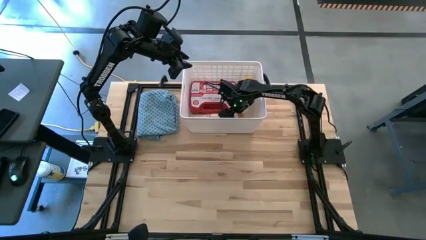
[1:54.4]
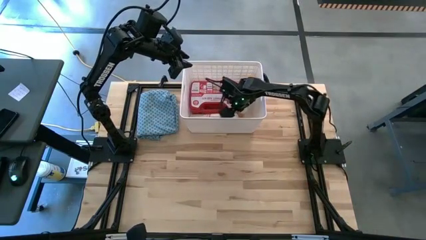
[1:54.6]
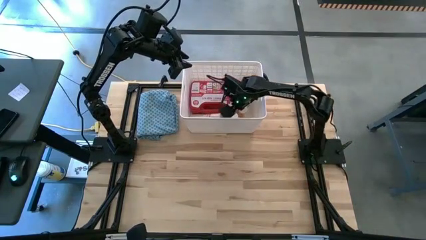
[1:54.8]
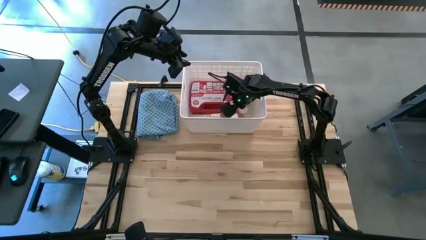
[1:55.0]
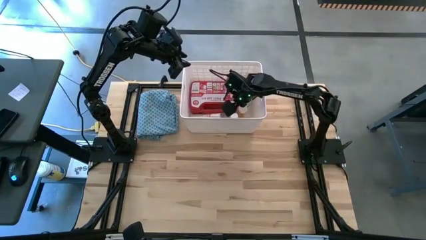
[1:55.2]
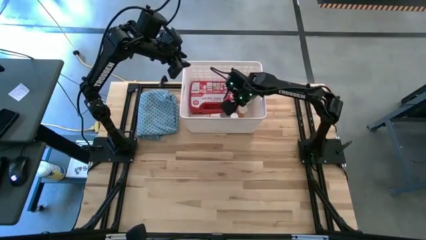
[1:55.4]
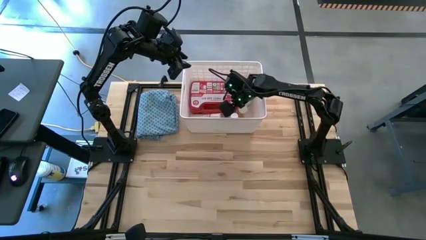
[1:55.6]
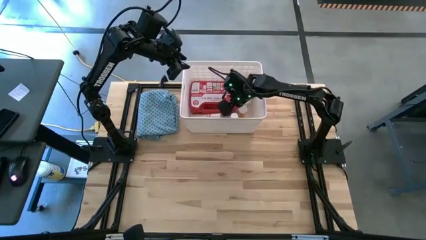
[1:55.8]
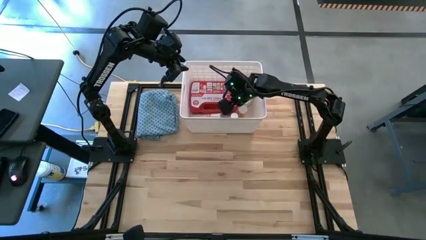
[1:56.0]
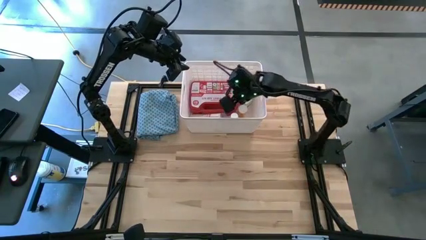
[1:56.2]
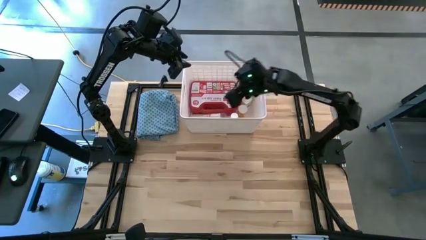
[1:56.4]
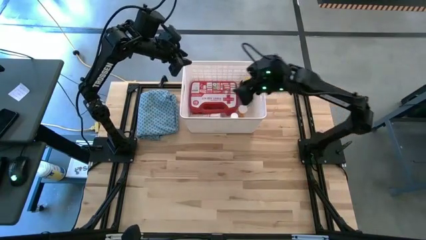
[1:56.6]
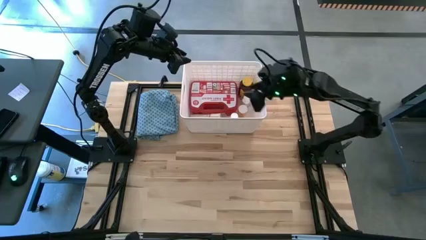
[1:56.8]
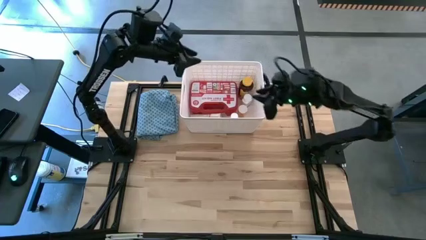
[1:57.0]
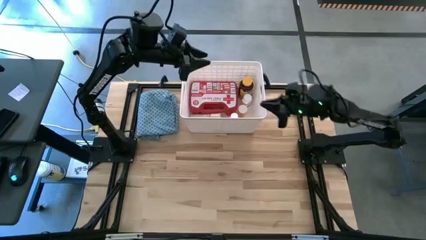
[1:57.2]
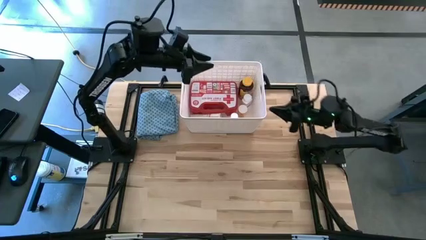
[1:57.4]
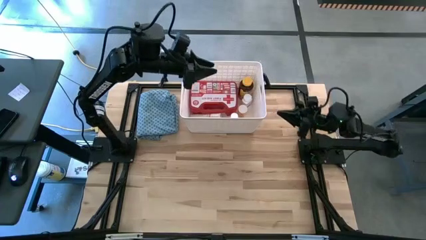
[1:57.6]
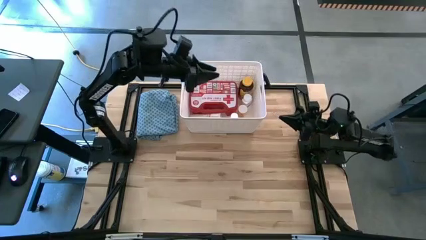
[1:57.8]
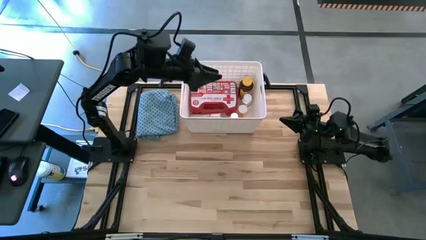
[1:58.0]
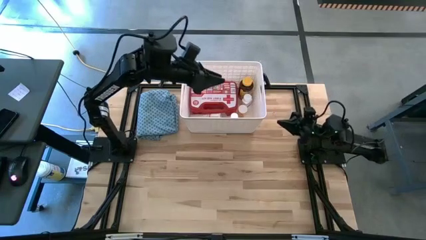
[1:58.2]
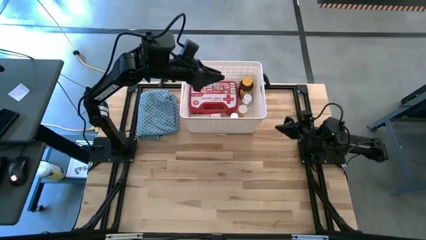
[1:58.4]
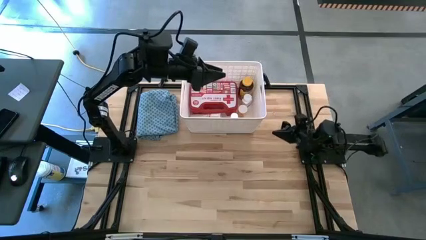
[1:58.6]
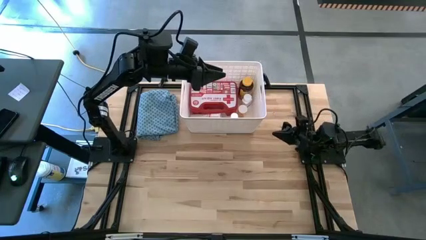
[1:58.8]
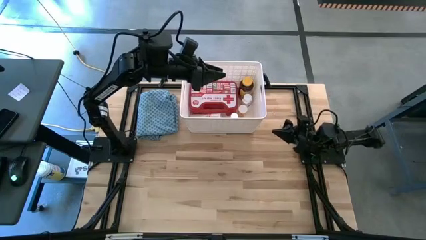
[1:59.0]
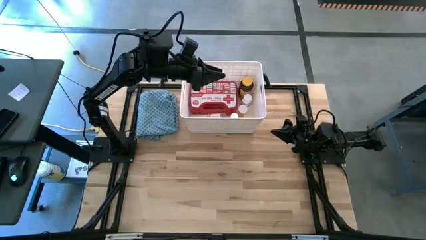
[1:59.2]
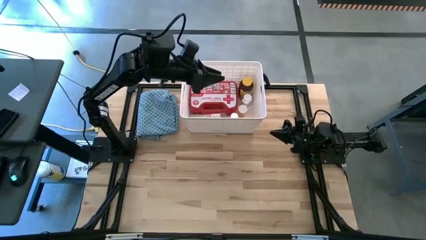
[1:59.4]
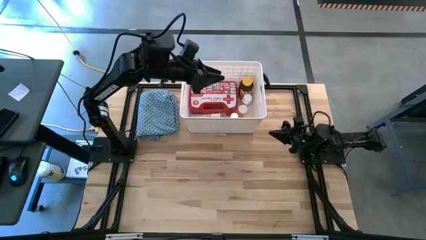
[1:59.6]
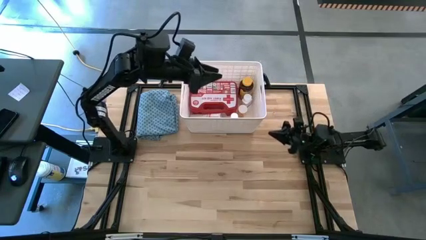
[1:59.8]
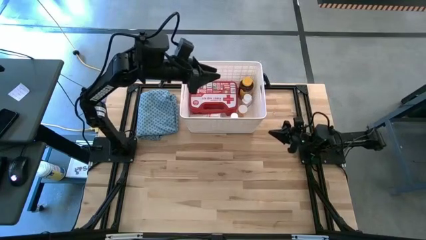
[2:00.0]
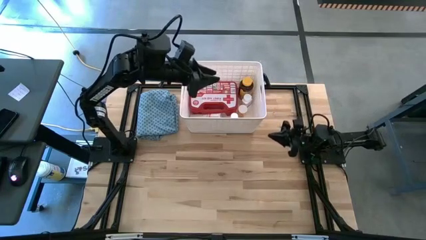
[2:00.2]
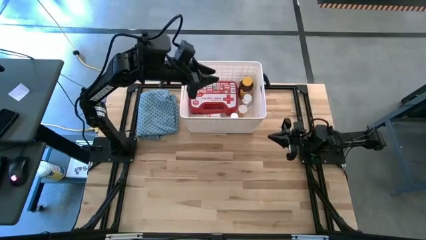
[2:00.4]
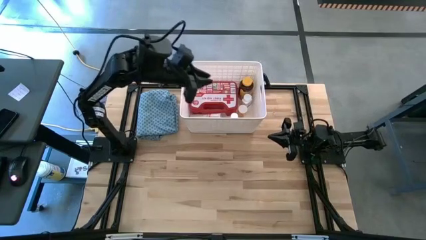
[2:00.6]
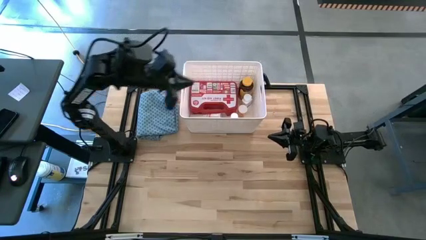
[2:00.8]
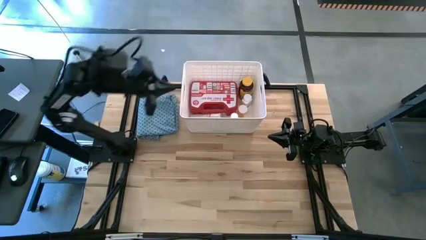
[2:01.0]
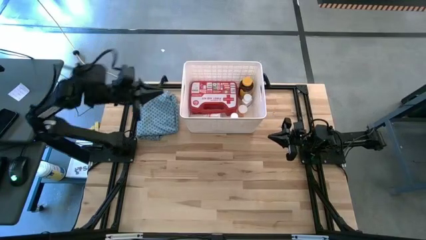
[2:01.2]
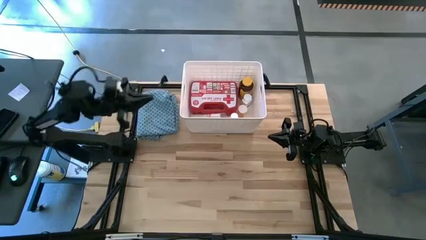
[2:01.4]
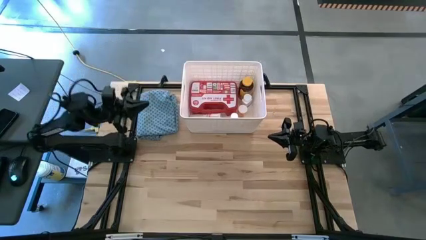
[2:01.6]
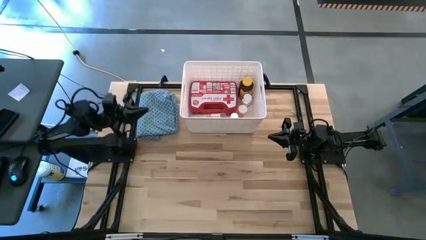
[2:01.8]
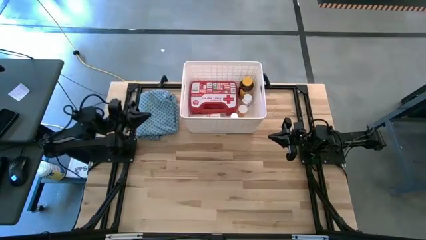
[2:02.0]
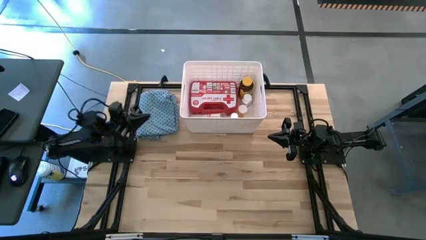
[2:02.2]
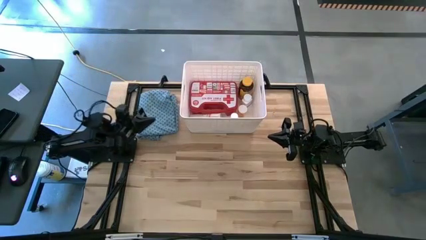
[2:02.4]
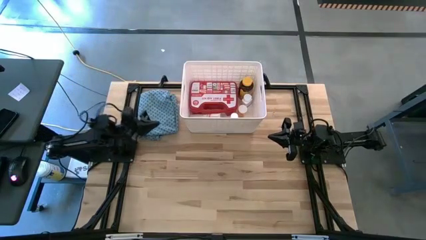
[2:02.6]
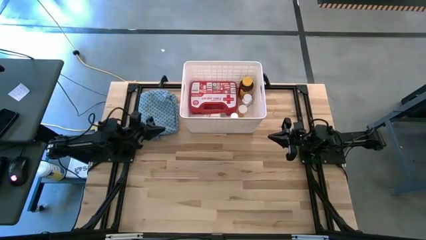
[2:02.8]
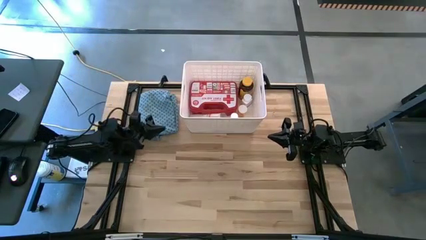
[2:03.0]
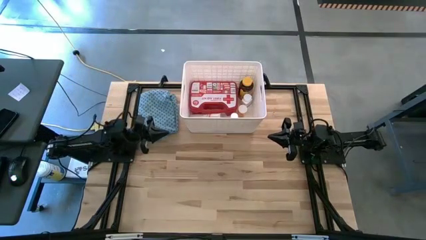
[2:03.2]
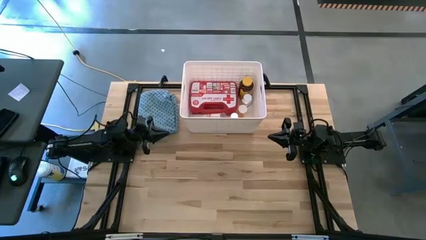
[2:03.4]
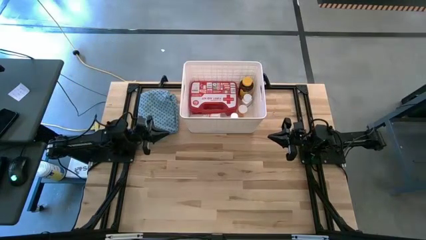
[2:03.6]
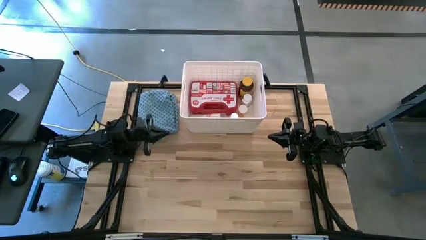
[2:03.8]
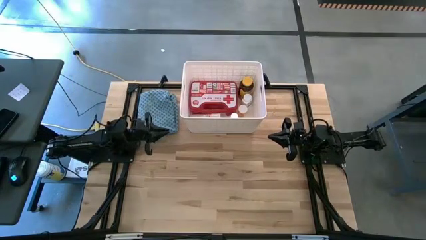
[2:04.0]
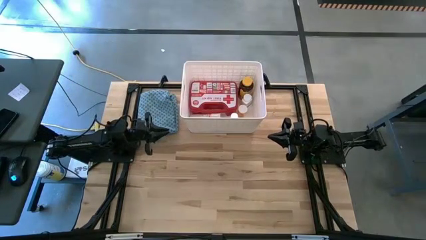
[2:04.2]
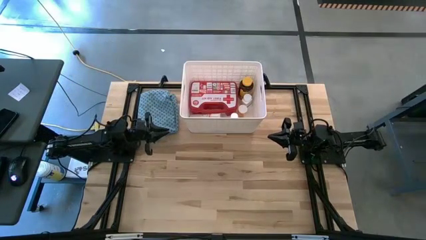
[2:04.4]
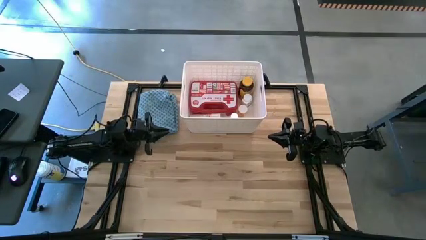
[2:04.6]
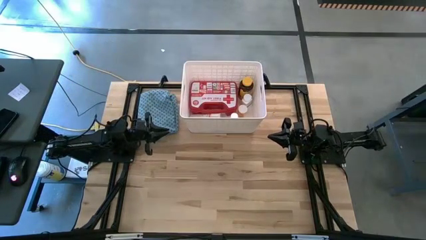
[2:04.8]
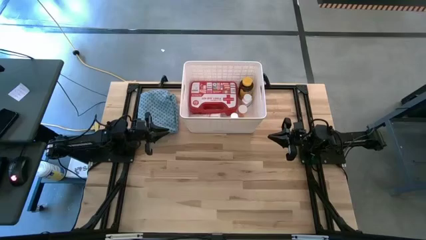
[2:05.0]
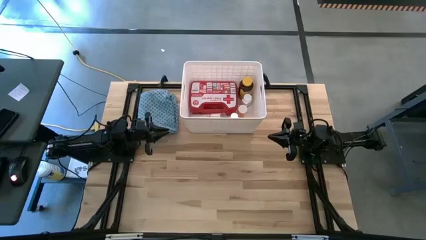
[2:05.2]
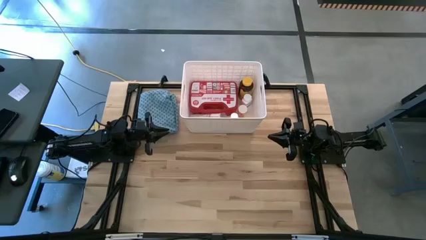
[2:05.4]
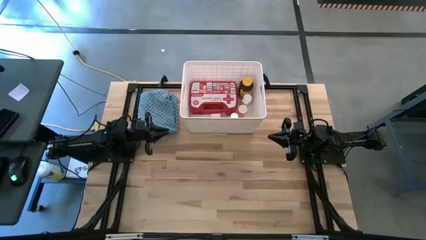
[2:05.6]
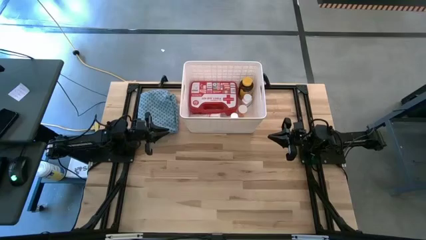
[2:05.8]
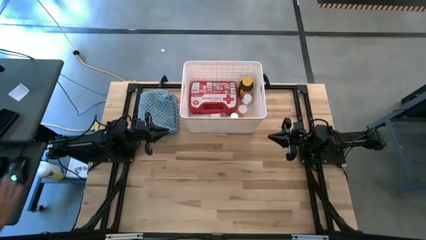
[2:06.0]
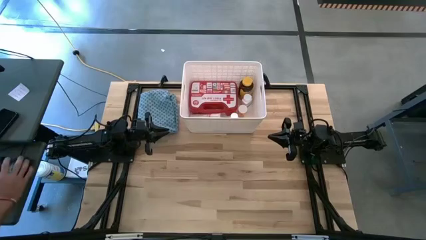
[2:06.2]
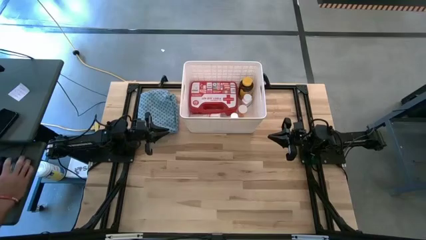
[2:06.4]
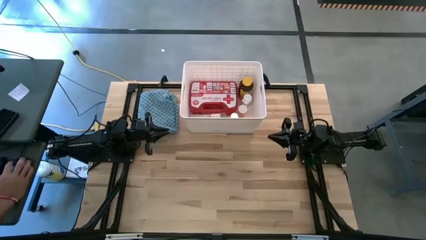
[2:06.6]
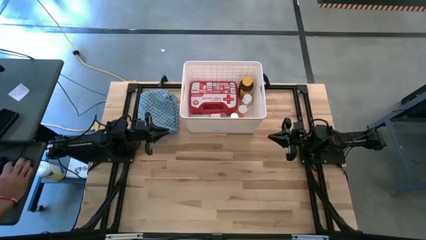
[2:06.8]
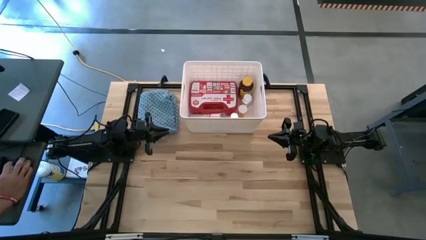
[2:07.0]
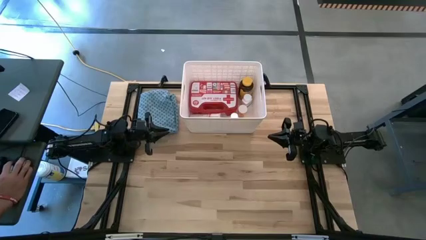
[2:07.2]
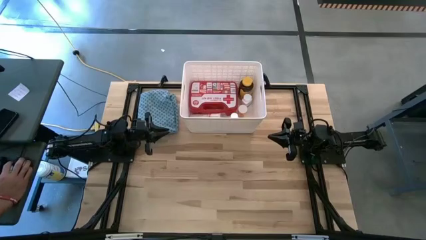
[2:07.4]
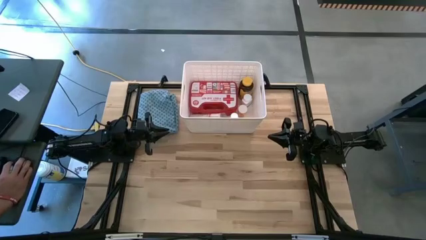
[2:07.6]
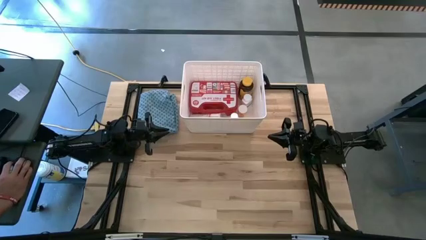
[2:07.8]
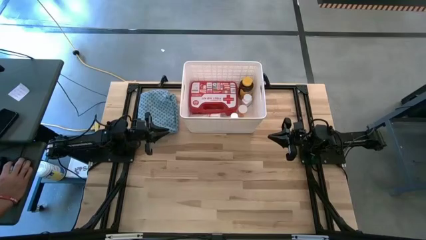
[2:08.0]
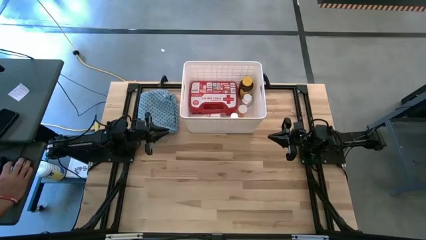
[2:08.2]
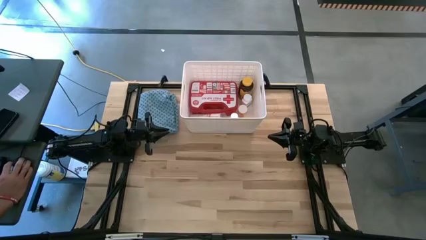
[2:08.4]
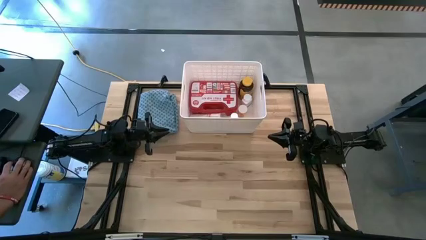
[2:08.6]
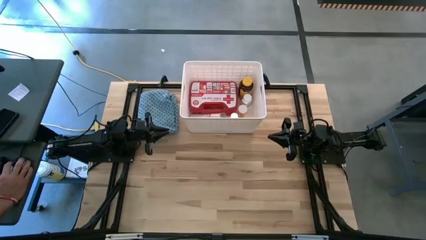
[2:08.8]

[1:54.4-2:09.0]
Task: Pick & place medical supplies in basket/bin
Return to Home Position

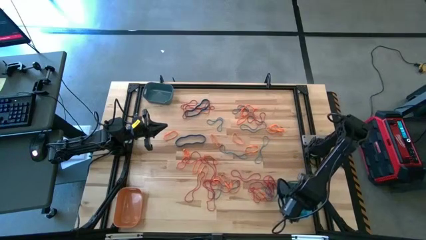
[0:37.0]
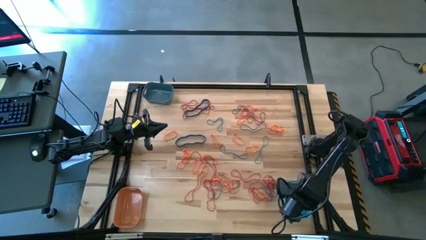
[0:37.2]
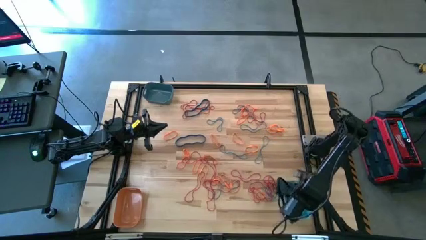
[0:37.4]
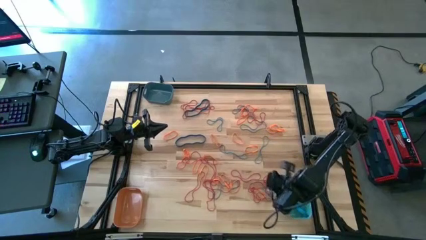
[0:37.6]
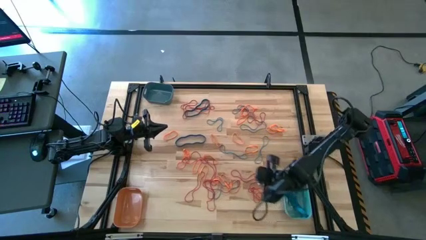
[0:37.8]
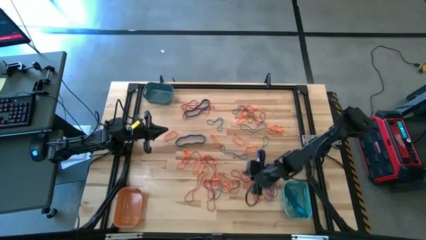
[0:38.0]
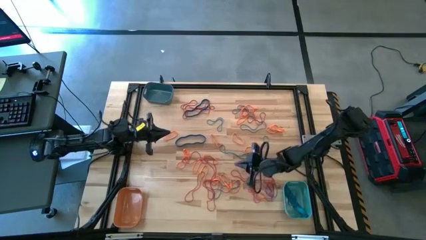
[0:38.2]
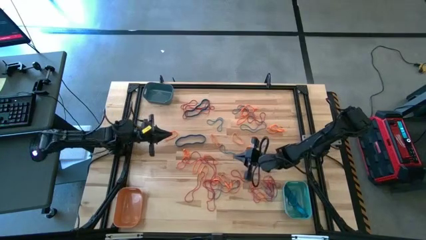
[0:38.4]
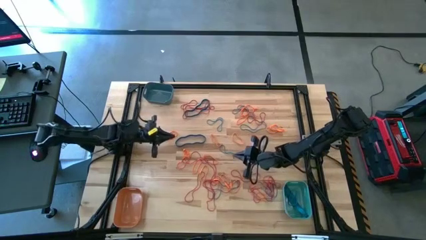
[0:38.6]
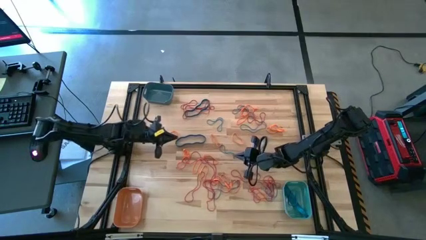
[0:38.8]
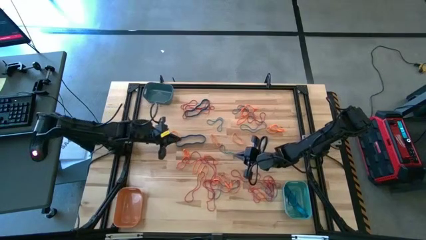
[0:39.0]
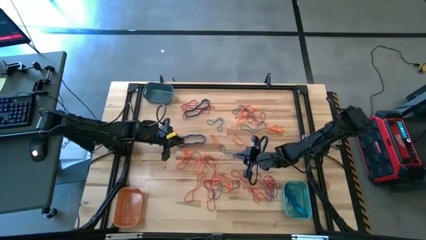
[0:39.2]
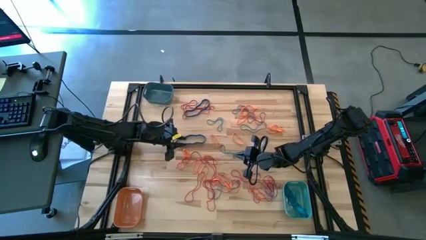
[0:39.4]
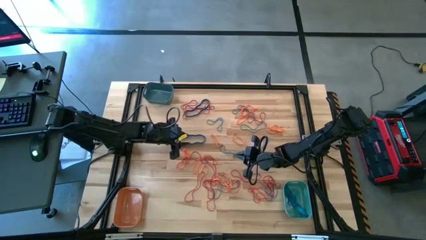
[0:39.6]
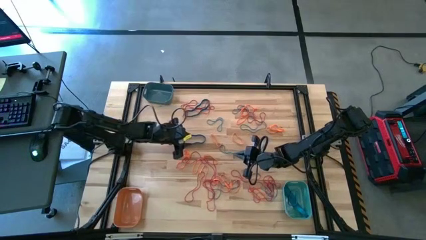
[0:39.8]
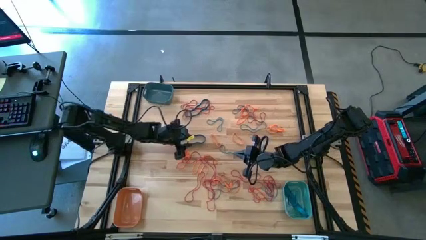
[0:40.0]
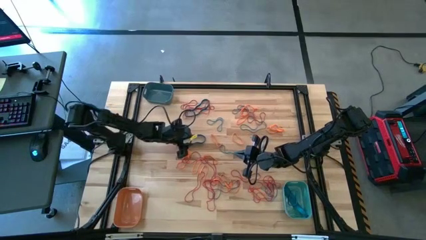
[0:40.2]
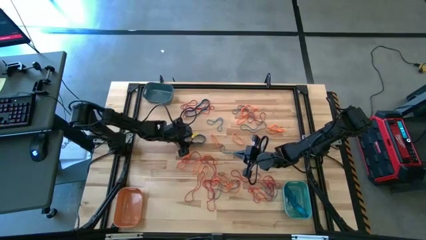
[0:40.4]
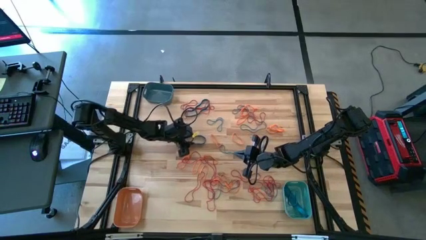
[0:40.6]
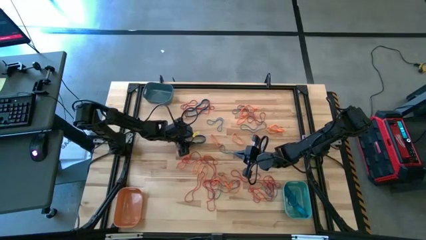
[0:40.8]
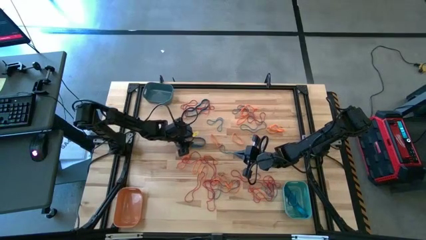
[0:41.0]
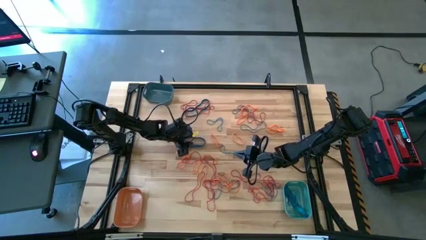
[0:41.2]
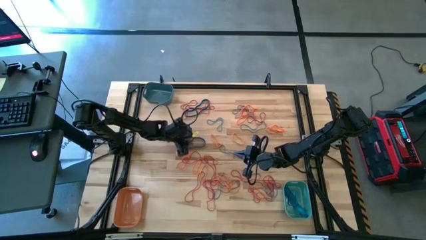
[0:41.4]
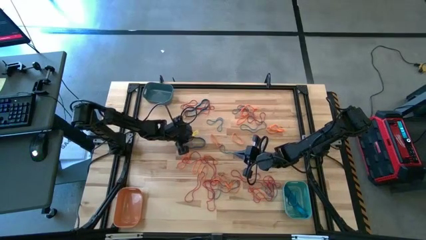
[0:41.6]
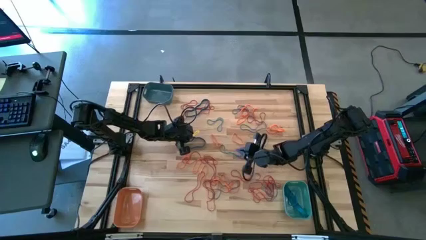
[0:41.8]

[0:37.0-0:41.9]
Task: Sort rubber bands into baskets
Put the blue rubber band into the light blue bin
